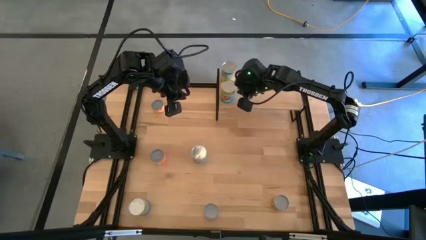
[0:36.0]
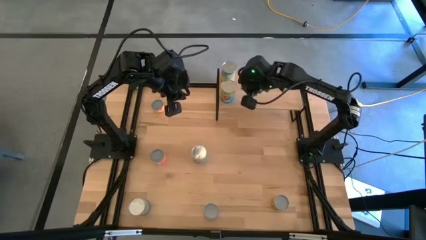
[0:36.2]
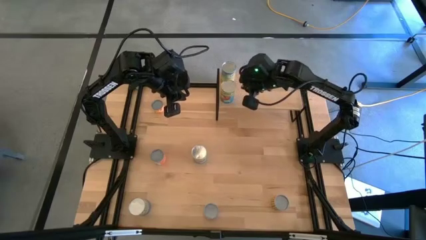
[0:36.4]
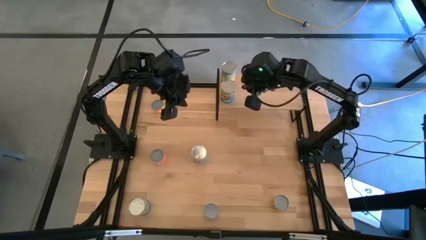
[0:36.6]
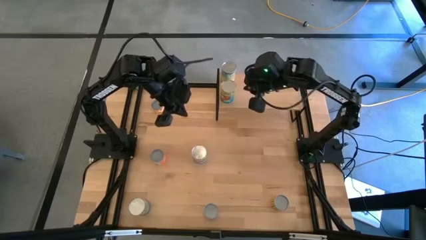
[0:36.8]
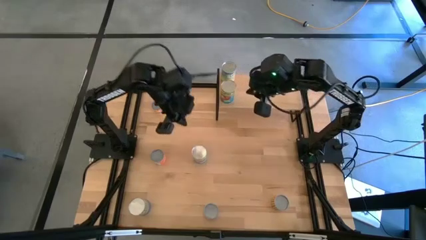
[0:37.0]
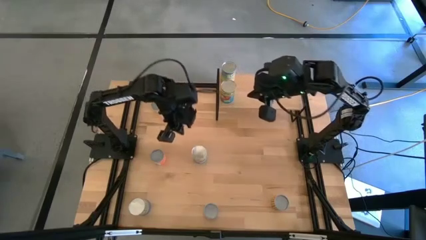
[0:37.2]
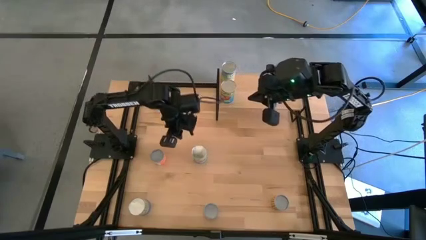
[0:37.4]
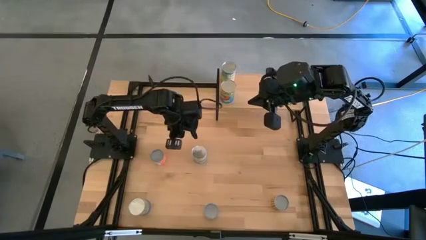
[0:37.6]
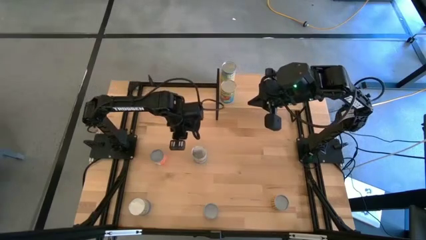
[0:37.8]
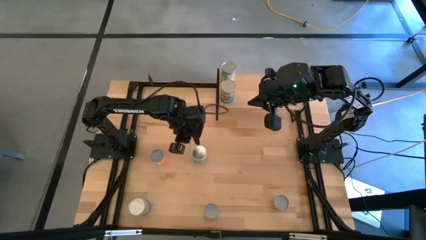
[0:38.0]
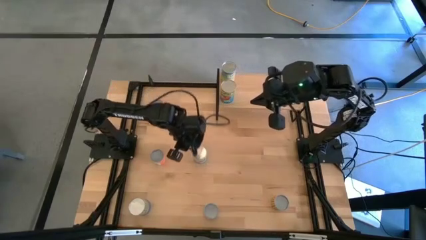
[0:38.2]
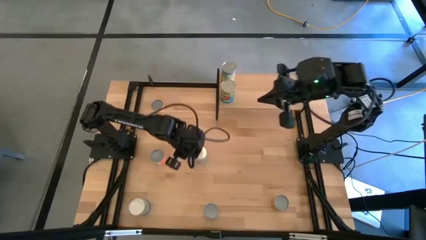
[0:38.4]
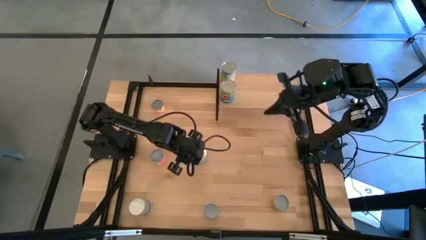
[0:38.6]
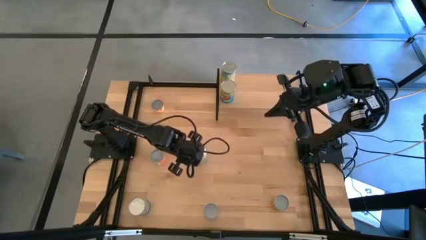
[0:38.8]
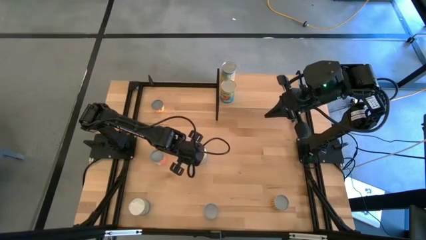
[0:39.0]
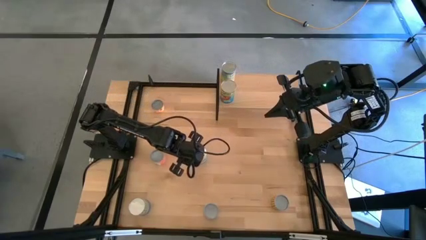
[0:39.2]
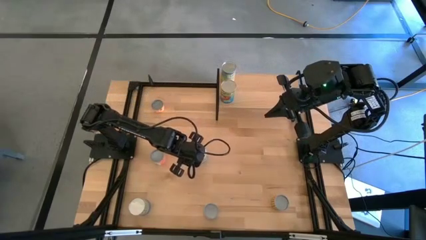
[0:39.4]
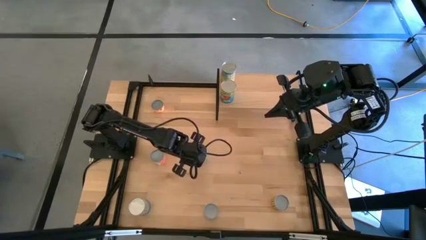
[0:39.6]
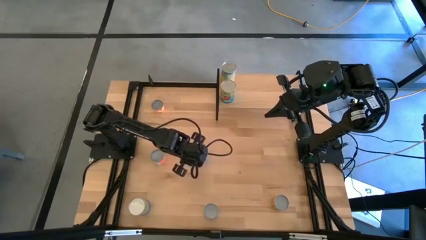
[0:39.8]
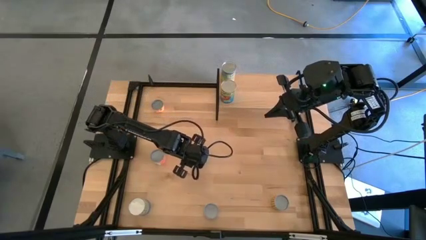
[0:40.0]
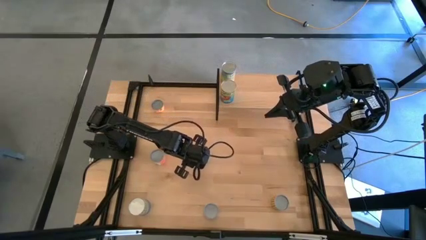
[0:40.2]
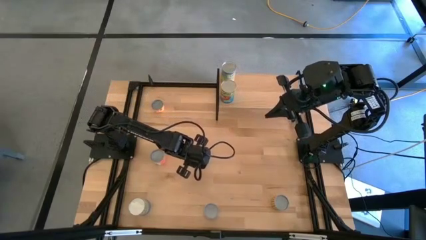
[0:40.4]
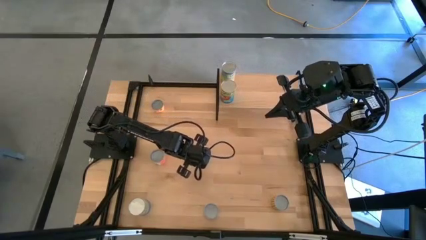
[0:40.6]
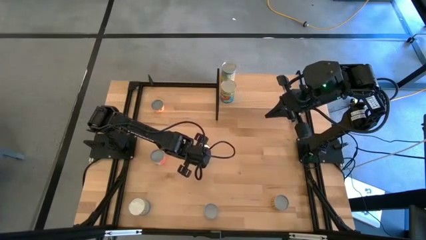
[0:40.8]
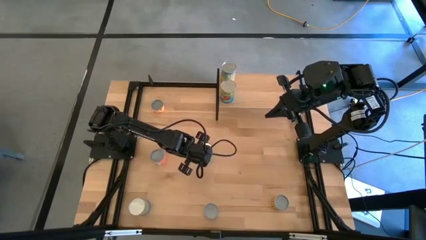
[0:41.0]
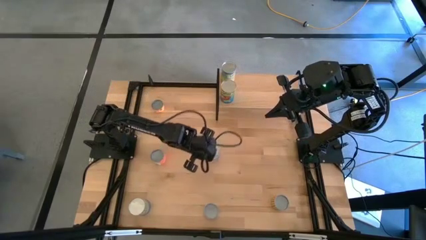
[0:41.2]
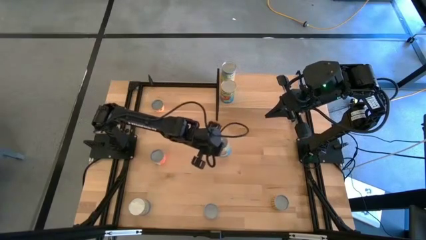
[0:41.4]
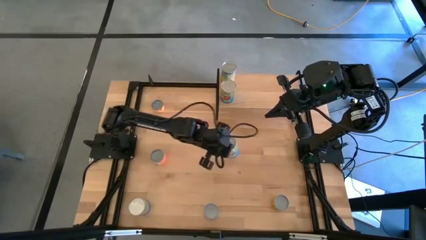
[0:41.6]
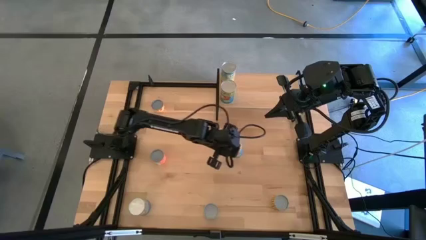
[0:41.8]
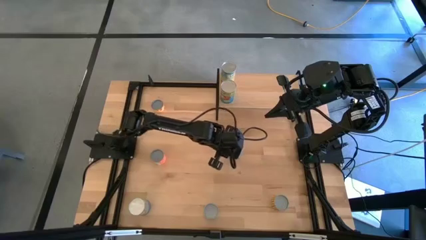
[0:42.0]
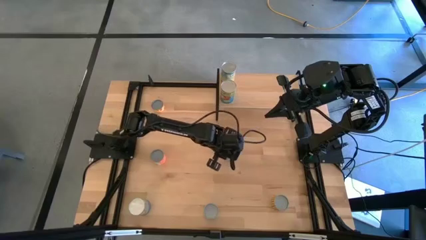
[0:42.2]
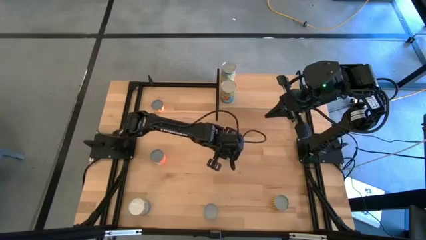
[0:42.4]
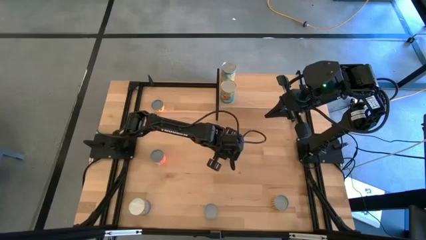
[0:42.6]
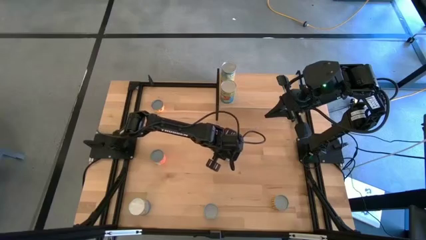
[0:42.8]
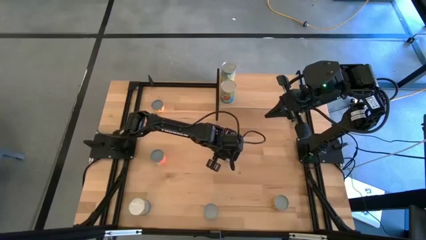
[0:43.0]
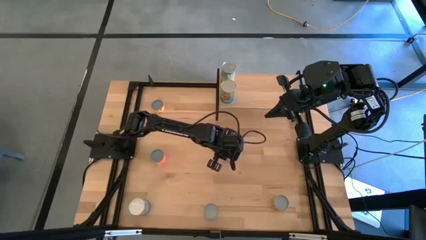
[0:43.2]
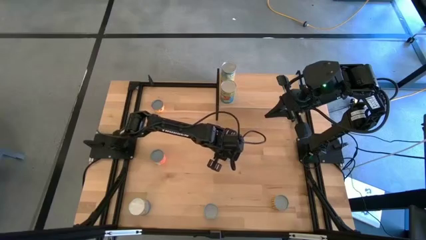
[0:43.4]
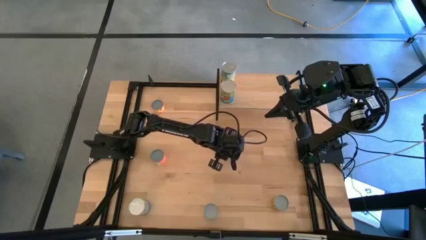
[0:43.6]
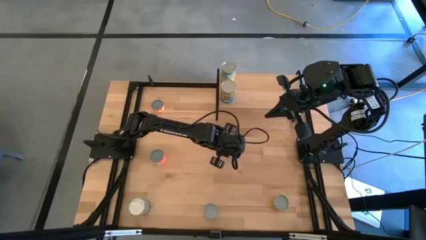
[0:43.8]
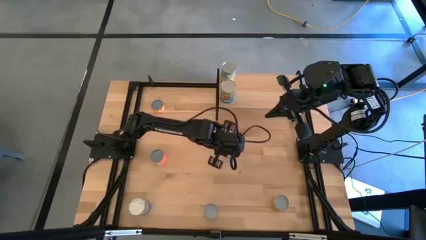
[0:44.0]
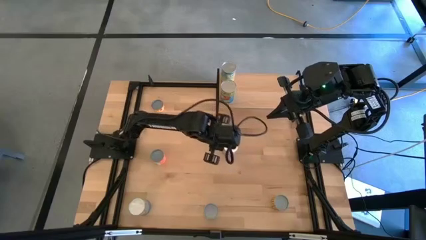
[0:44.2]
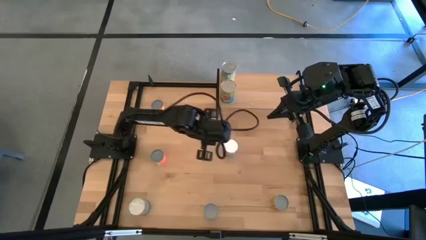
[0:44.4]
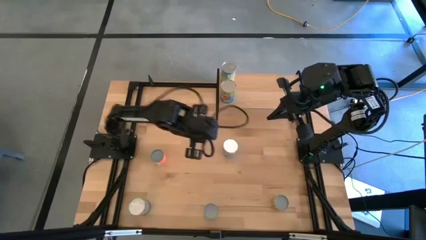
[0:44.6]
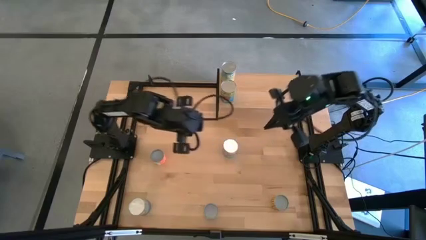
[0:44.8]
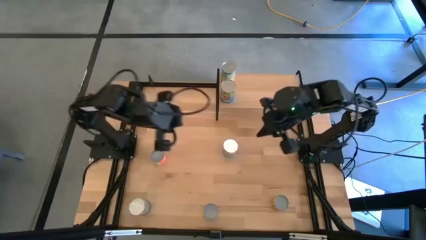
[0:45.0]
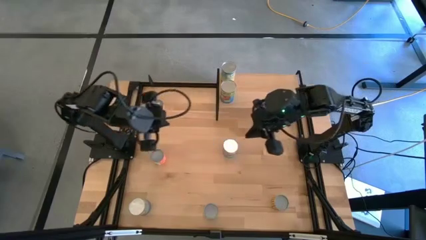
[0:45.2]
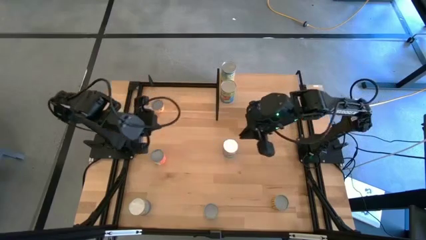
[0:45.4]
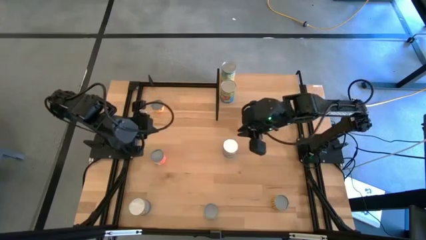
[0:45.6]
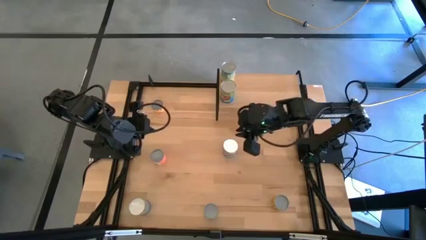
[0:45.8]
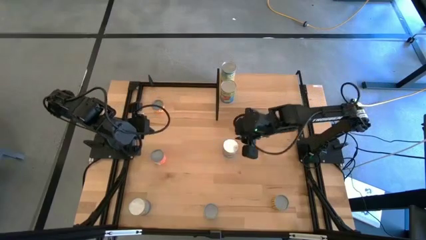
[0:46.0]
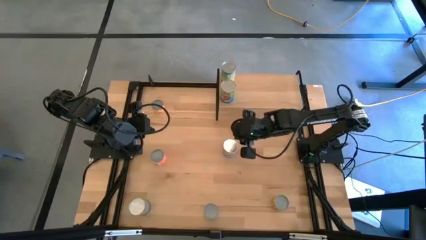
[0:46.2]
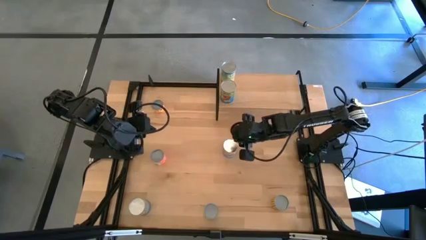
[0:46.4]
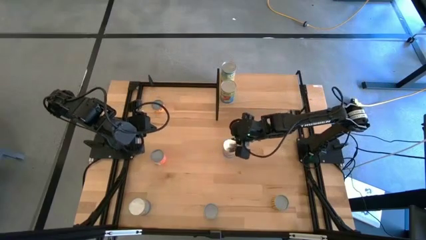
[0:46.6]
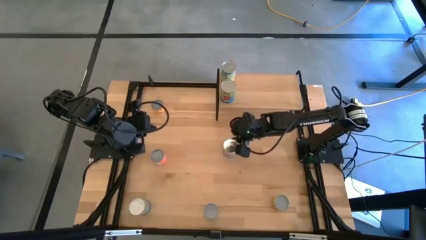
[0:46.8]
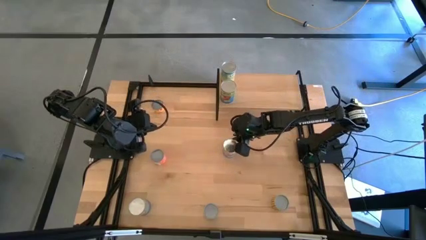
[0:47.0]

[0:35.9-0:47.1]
Task: Pick and place cans onto a shelf
Put the canned tomatoes on the shelf
